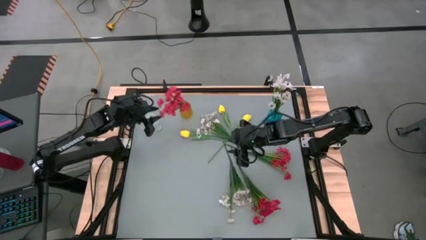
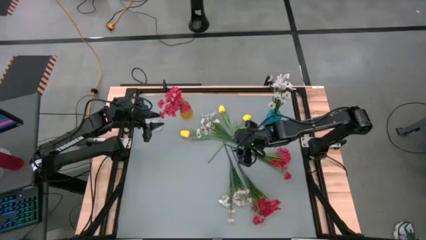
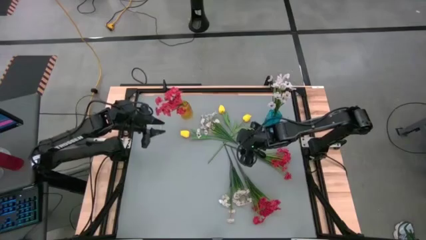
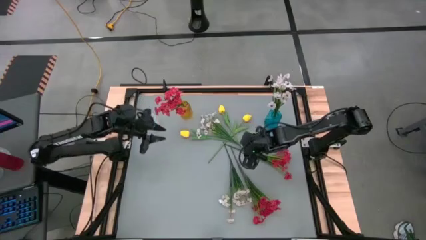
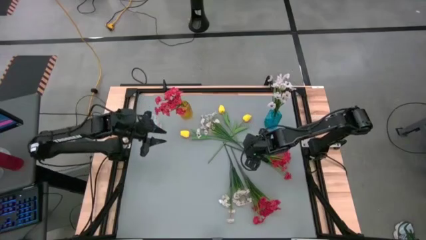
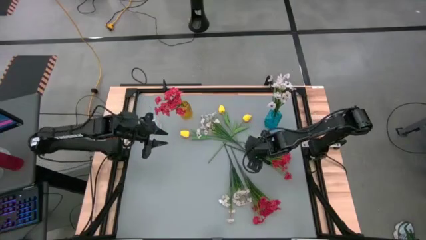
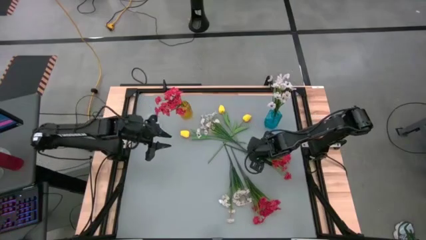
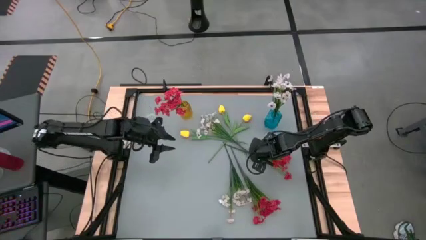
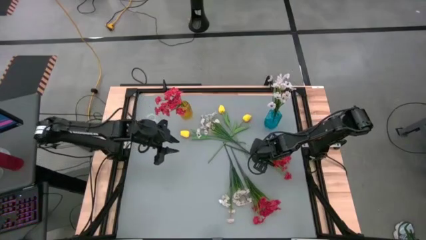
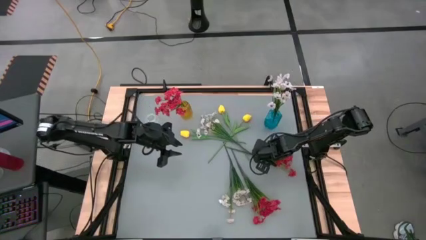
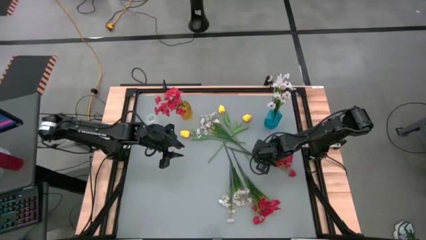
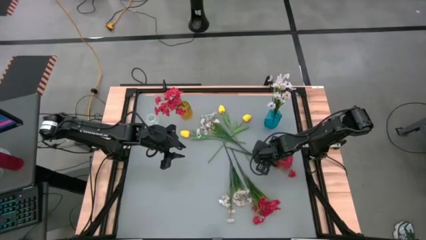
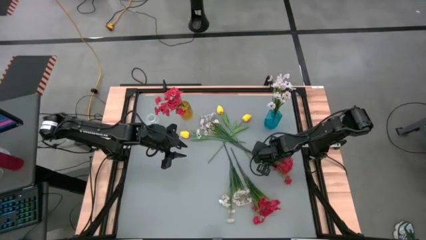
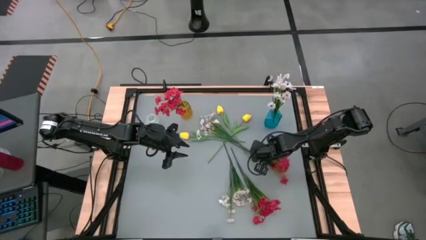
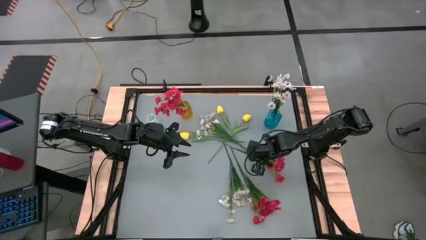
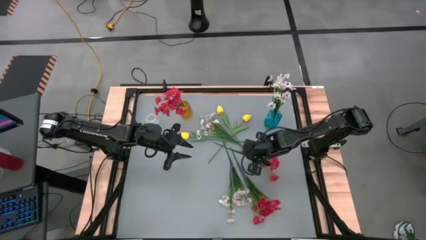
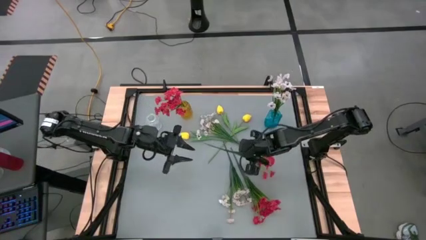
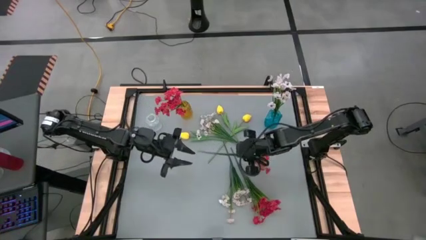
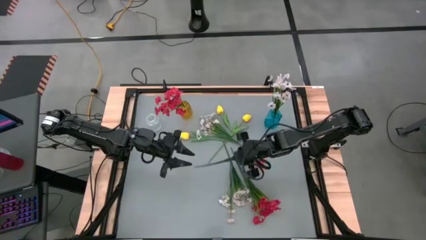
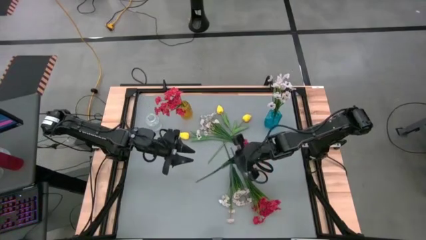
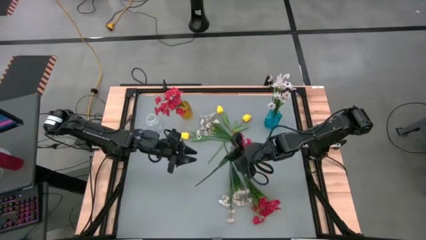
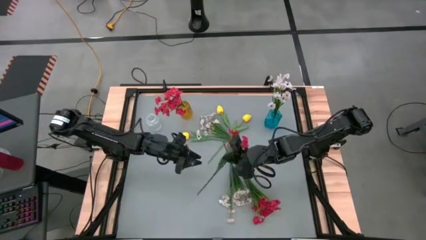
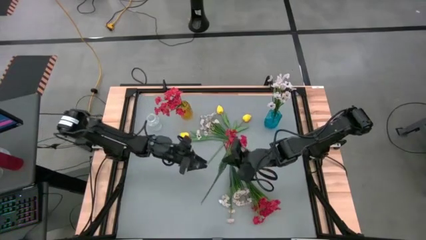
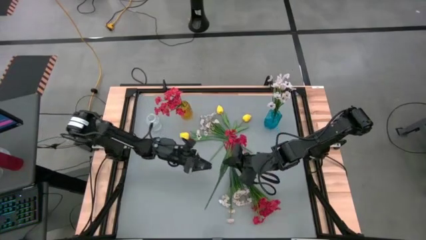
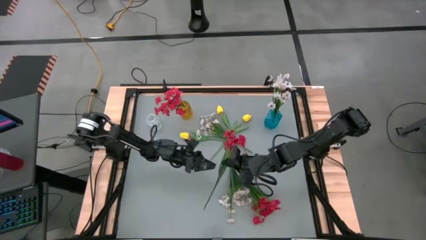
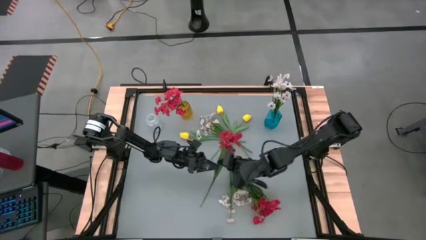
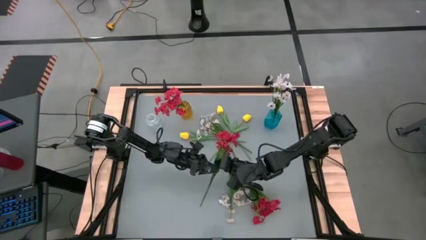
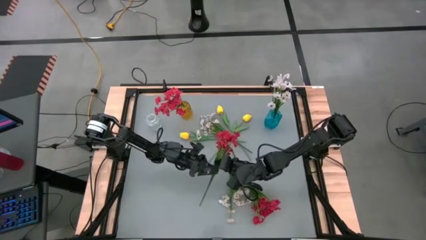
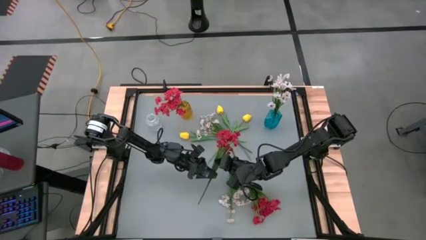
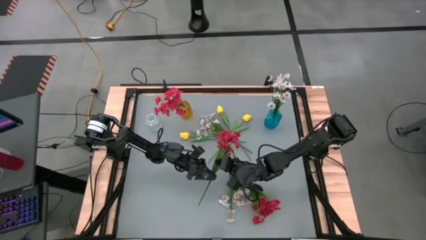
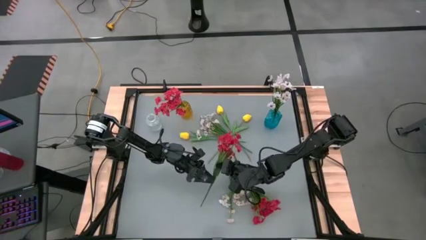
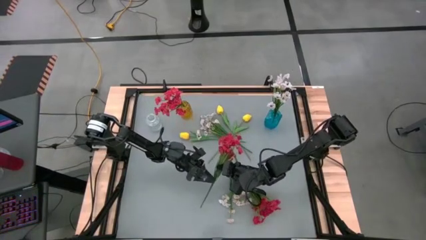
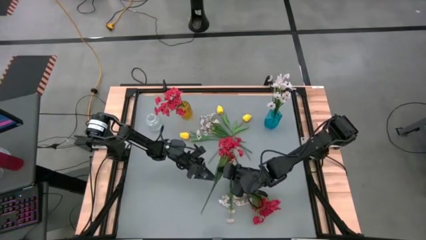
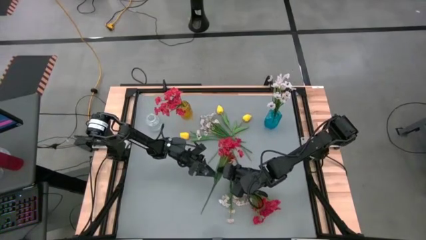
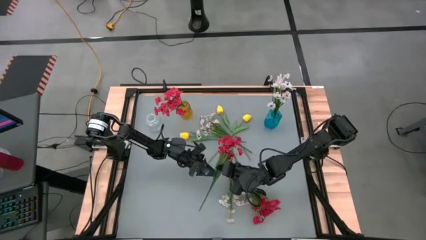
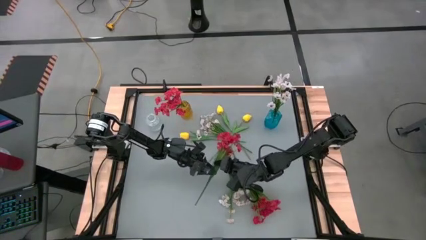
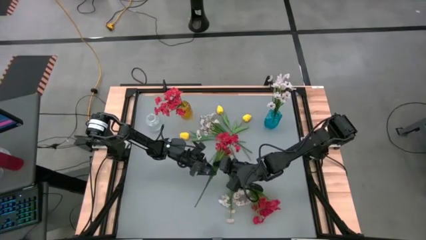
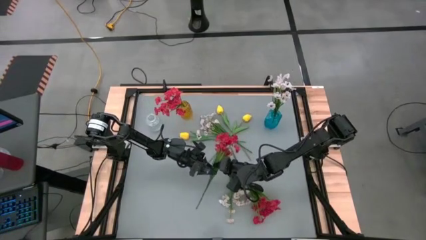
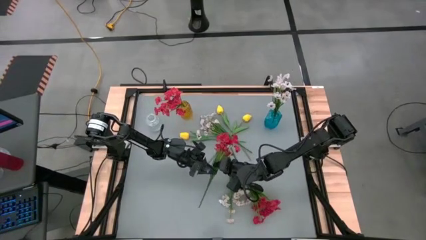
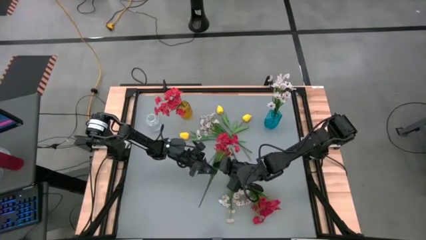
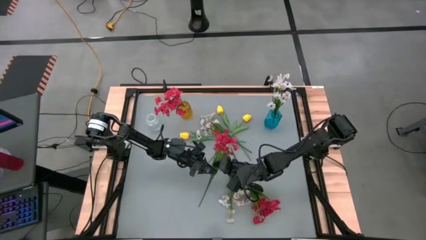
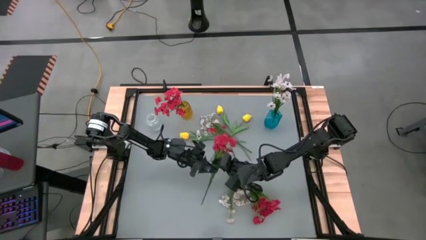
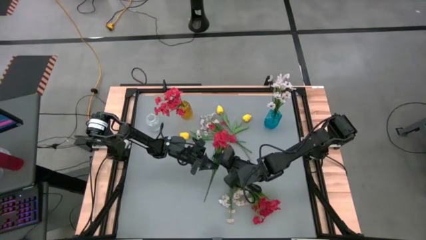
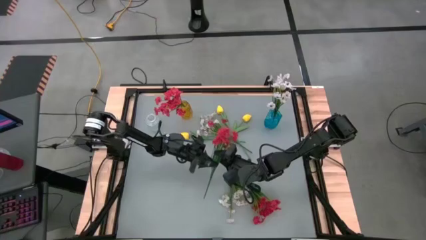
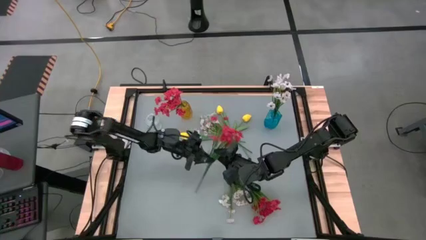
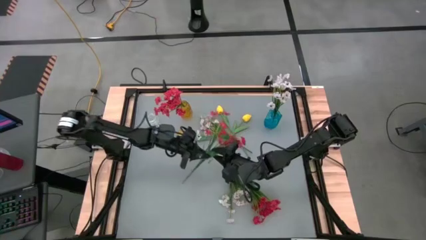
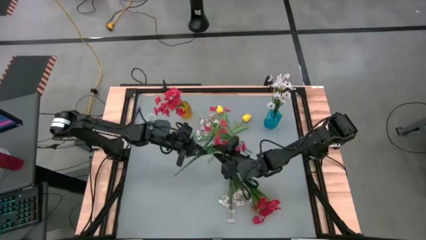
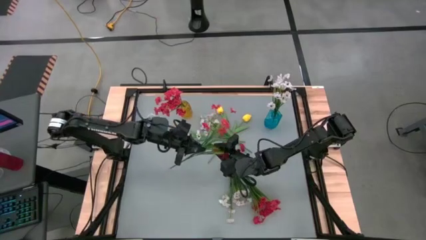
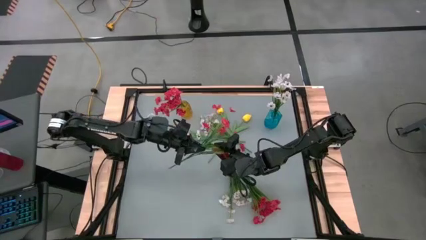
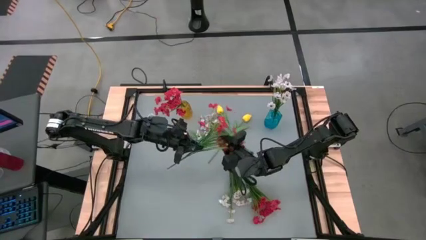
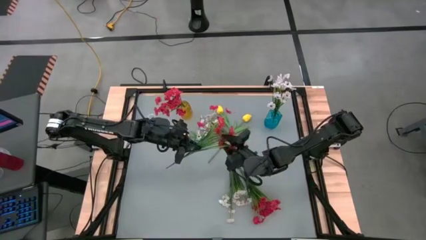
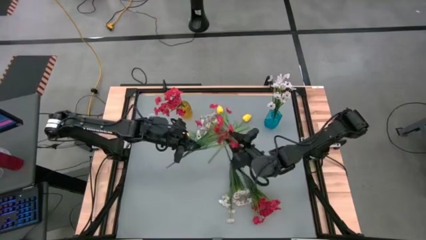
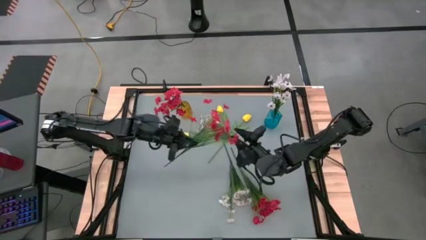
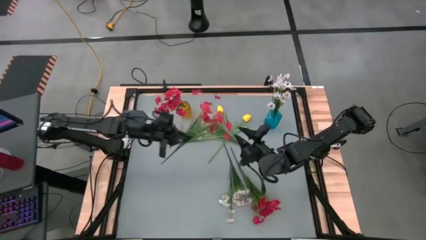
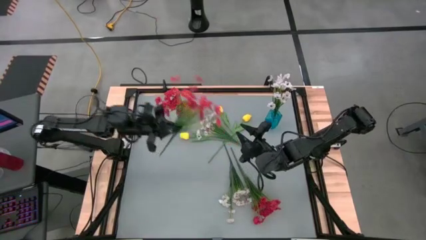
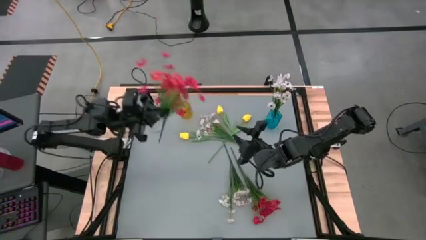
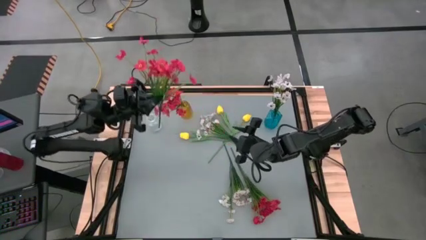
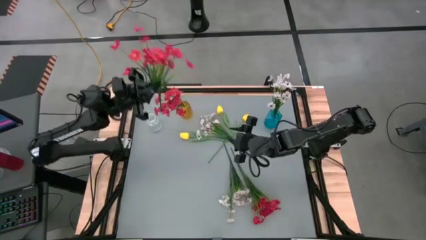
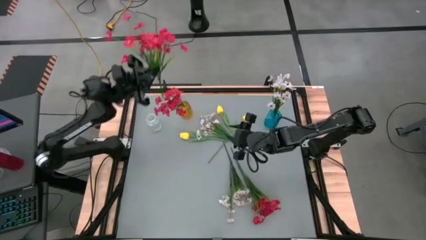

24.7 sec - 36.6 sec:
Task: Sort flowers into vase by color
Put the top red flowers into the yellow vase

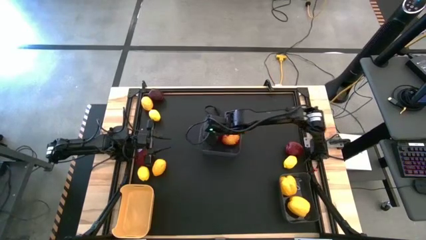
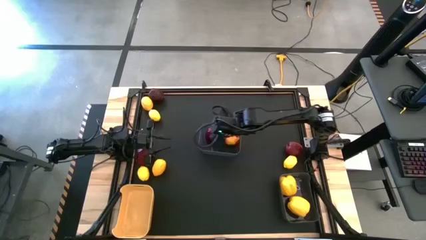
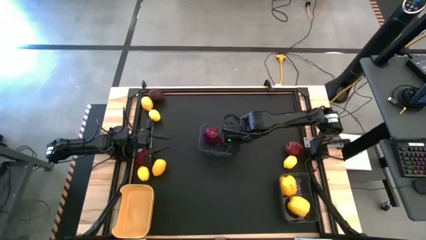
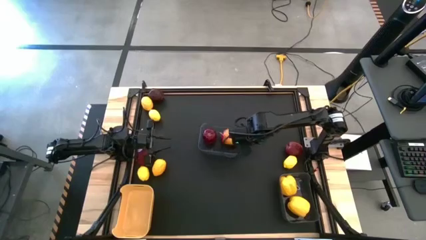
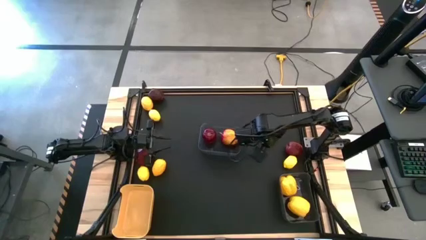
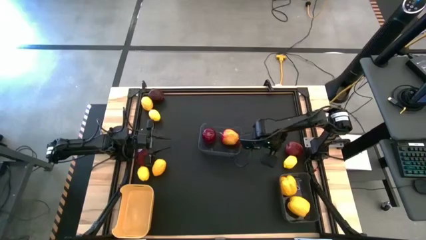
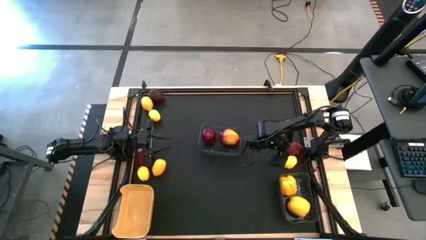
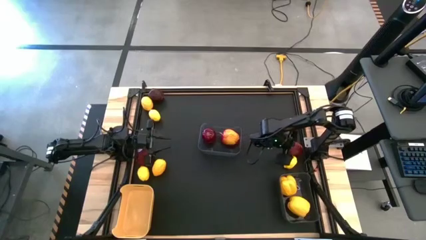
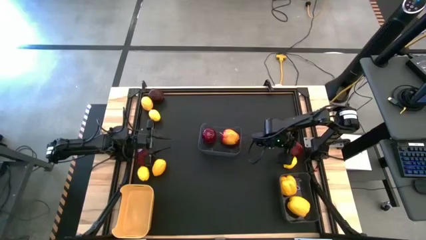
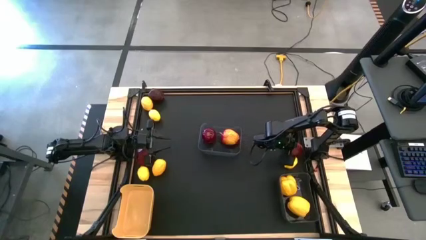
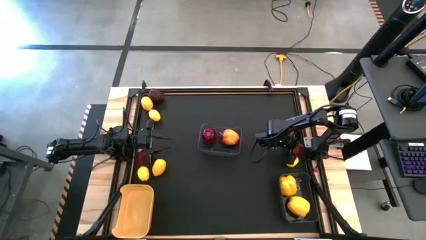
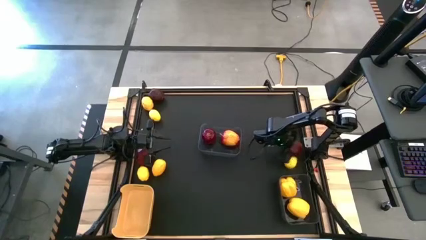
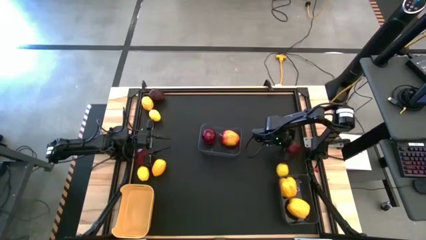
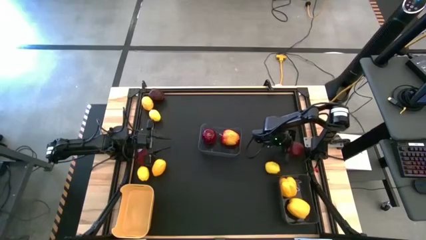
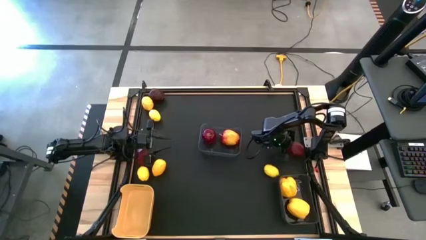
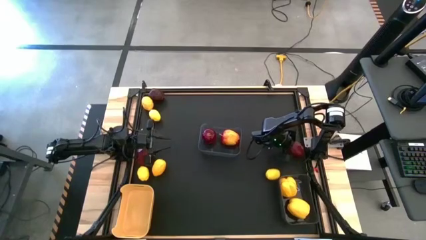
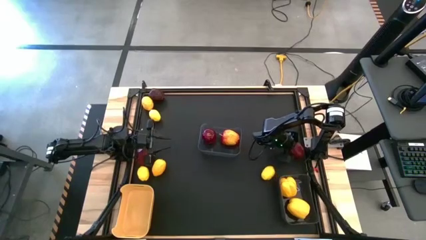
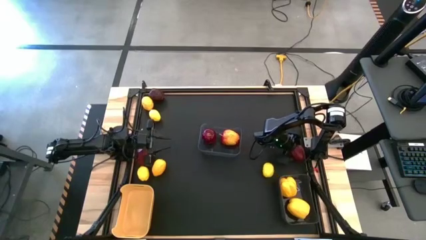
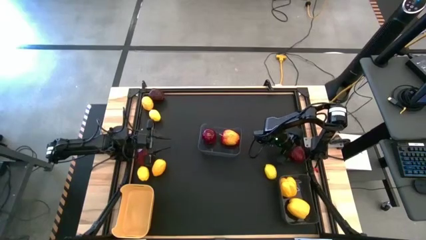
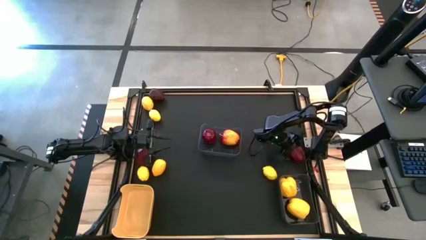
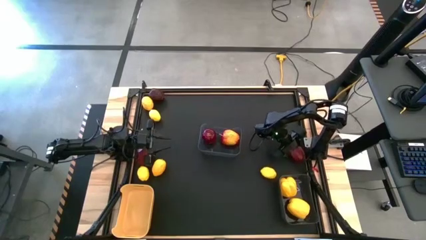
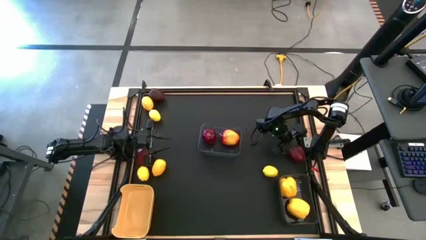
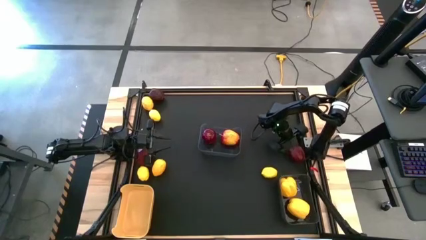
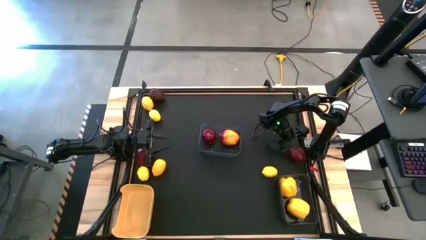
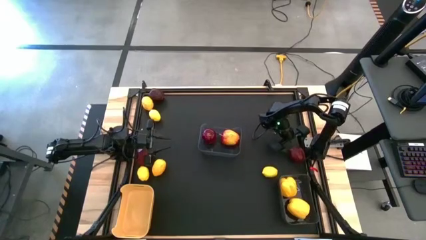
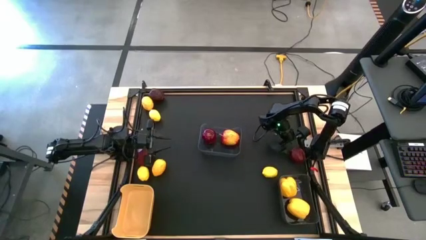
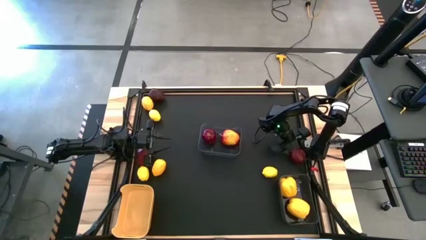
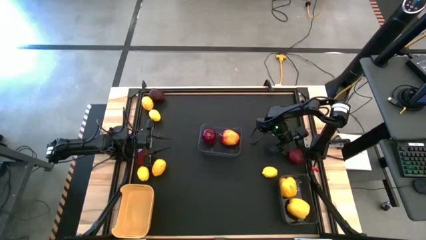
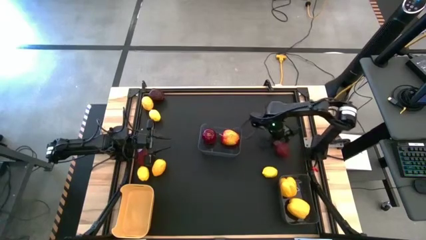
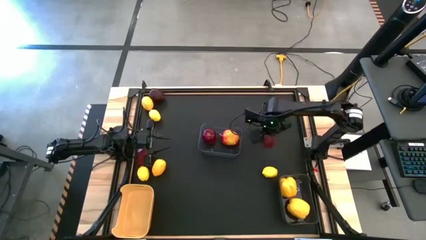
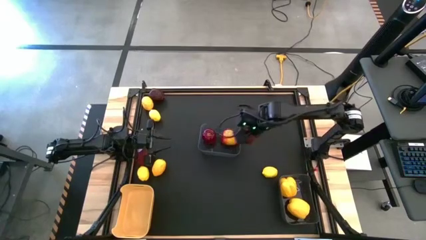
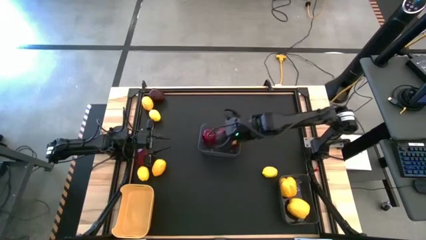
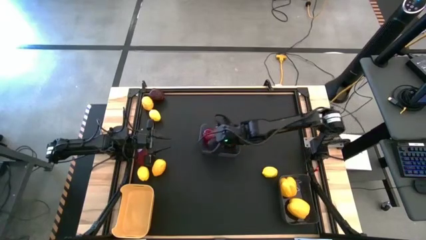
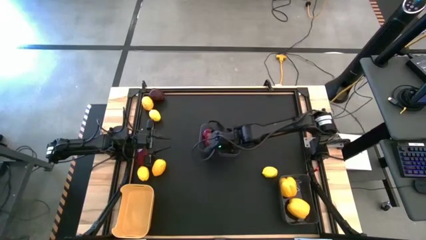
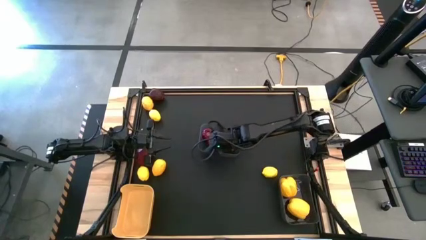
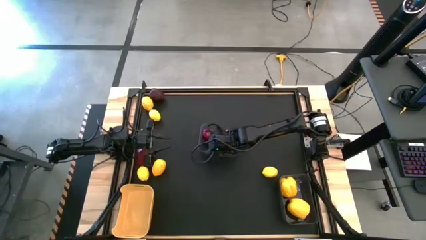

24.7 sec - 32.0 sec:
Task: Sort produce into baskets
Put the red apple into the top black bin
